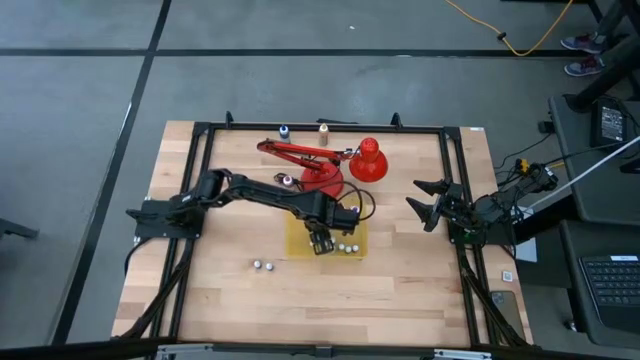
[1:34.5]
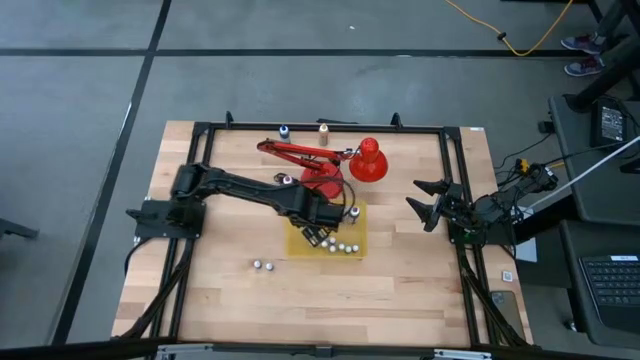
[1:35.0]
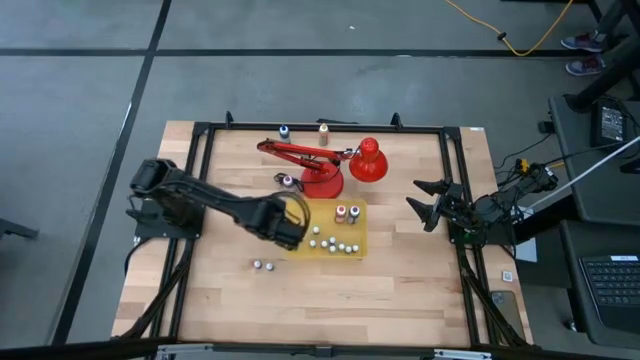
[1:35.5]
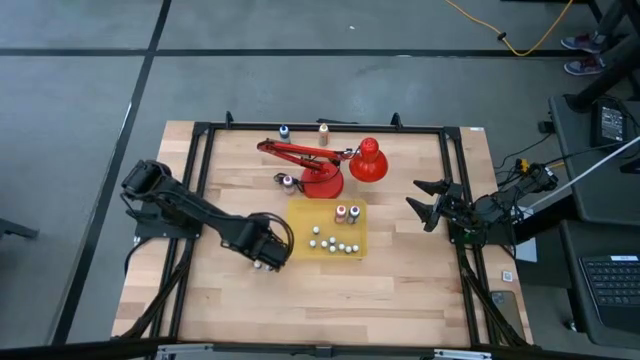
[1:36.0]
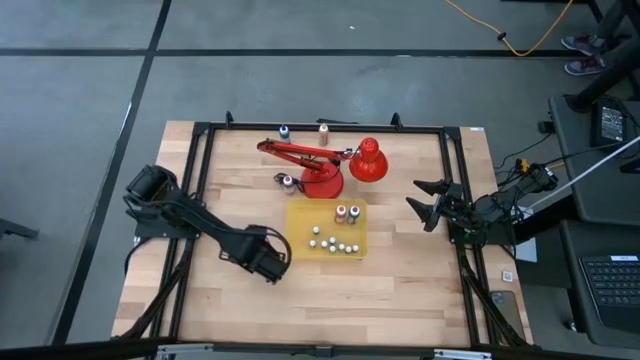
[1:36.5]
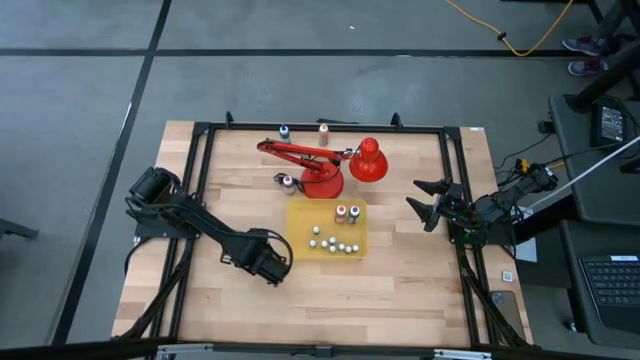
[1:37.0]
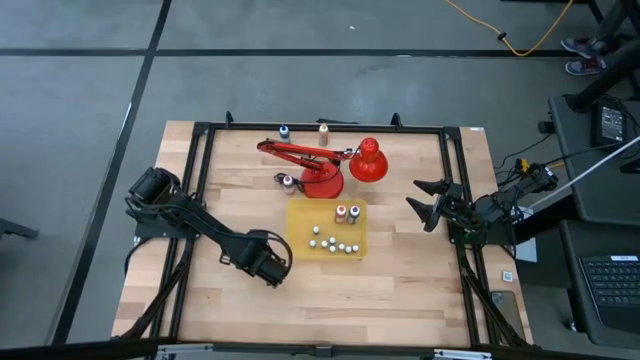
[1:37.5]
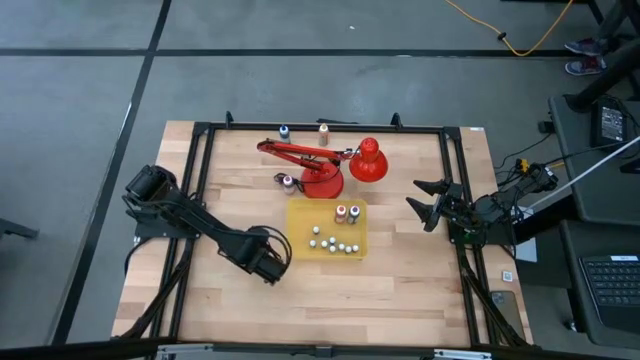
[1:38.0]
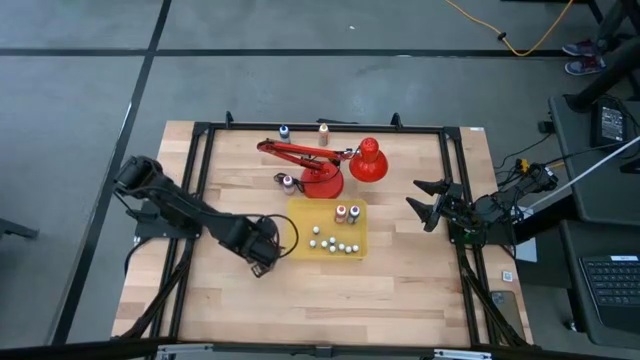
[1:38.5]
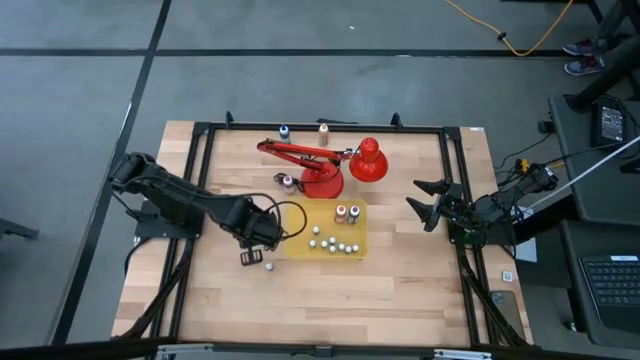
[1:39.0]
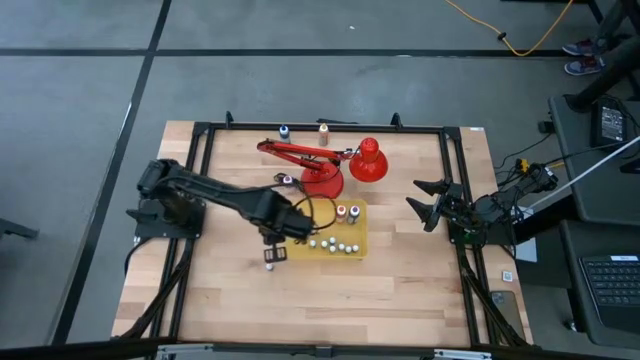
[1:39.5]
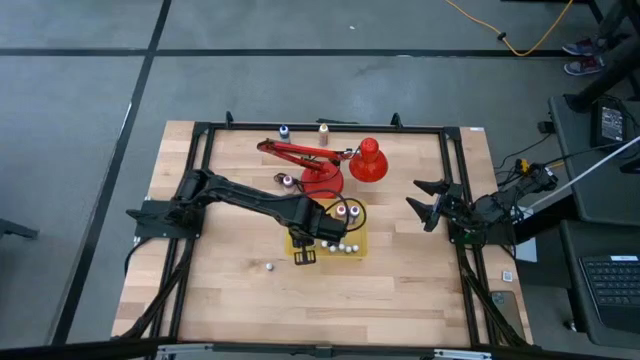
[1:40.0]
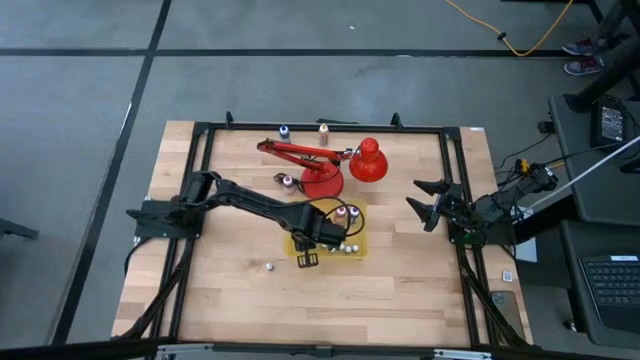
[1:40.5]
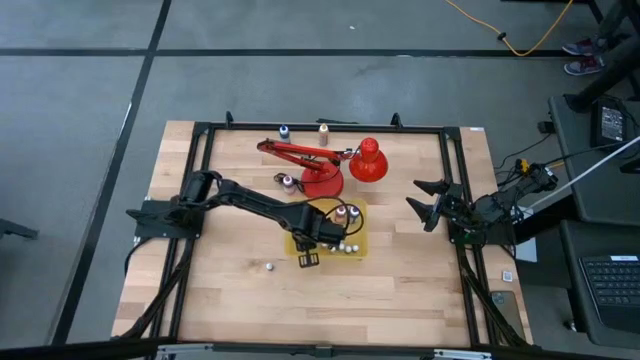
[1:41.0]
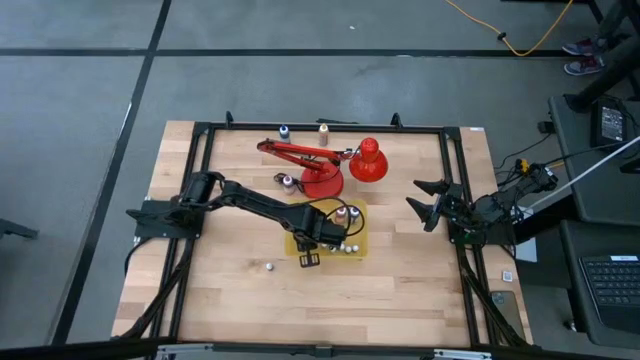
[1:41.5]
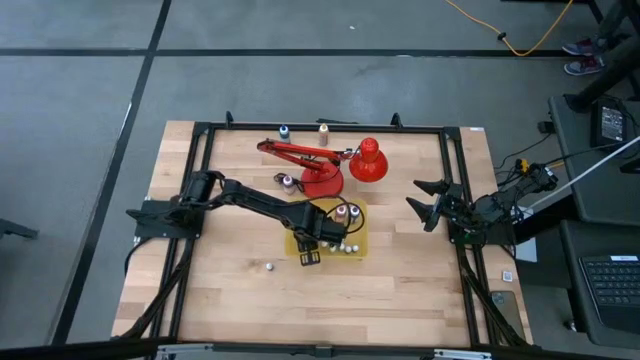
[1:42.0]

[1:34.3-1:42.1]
Task: Pick & Place food coloring
Put the small black food bottle into the yellow bin

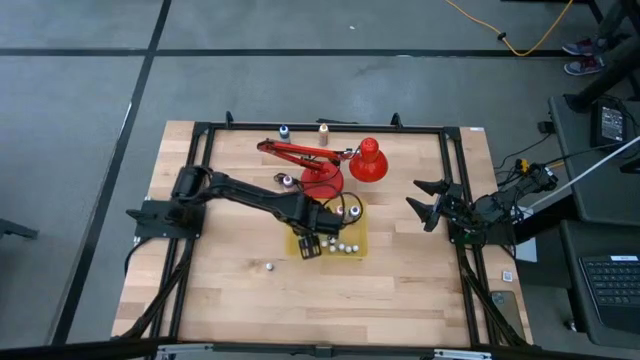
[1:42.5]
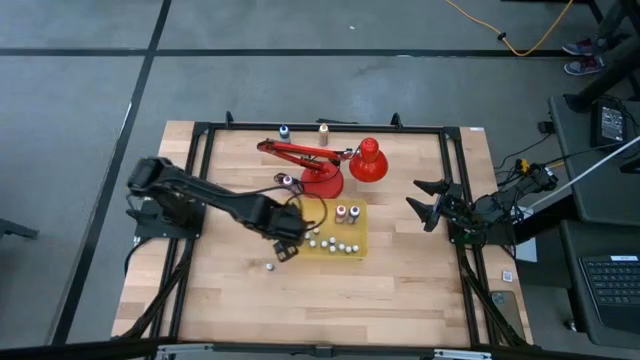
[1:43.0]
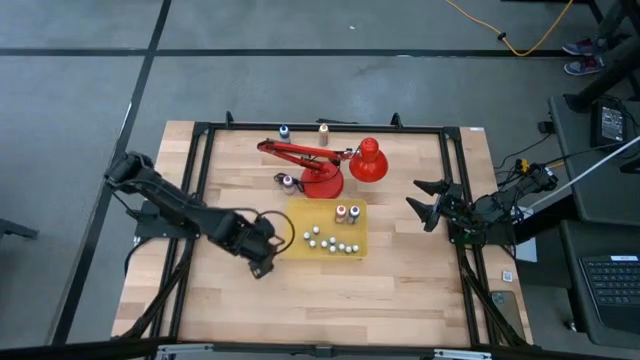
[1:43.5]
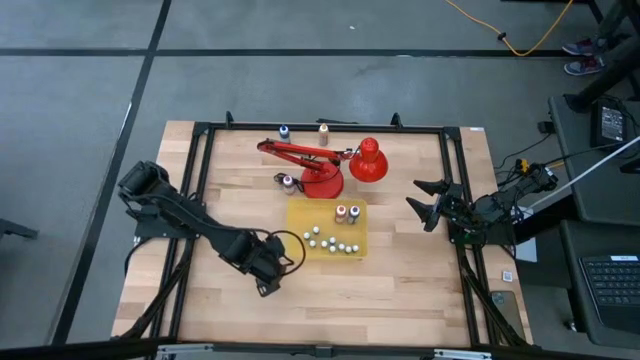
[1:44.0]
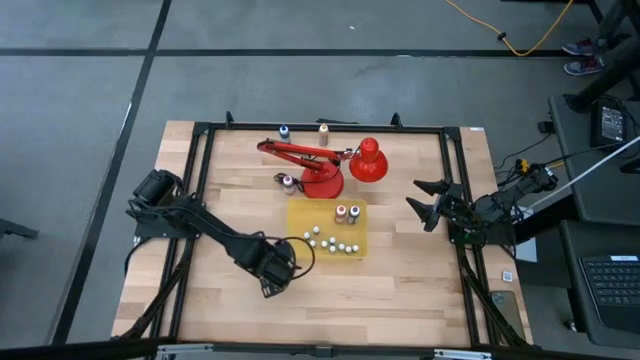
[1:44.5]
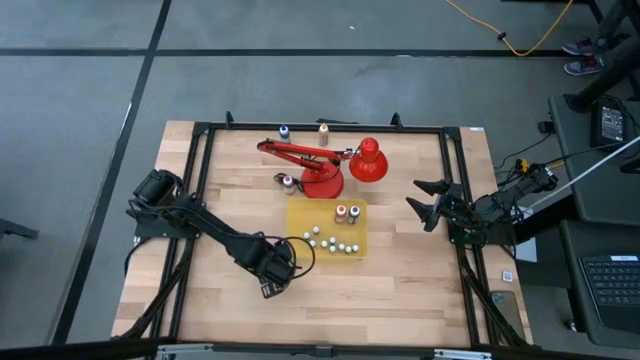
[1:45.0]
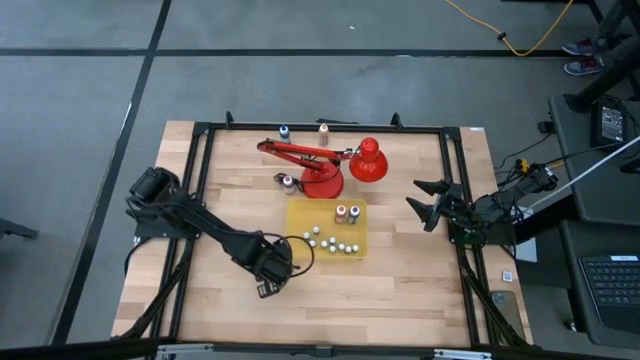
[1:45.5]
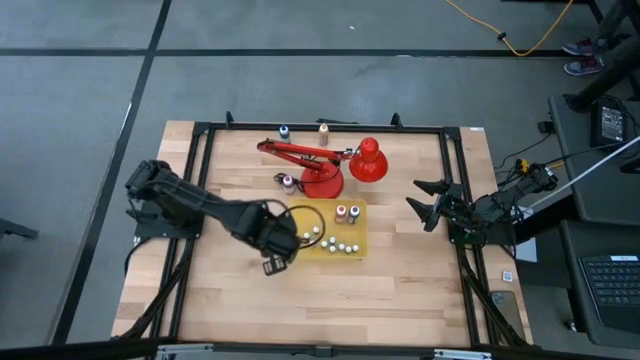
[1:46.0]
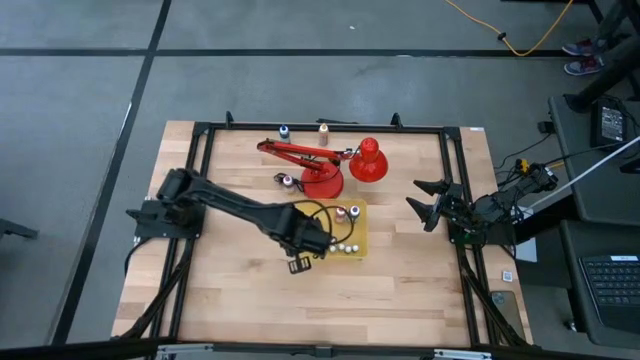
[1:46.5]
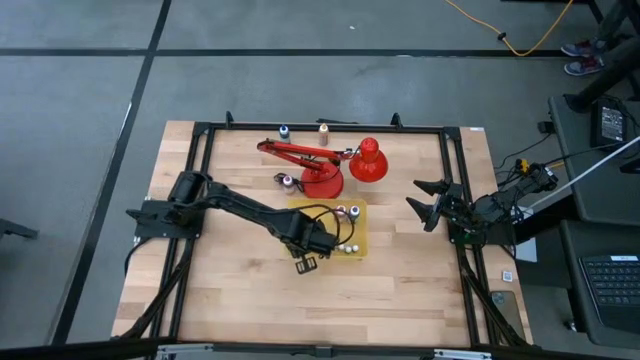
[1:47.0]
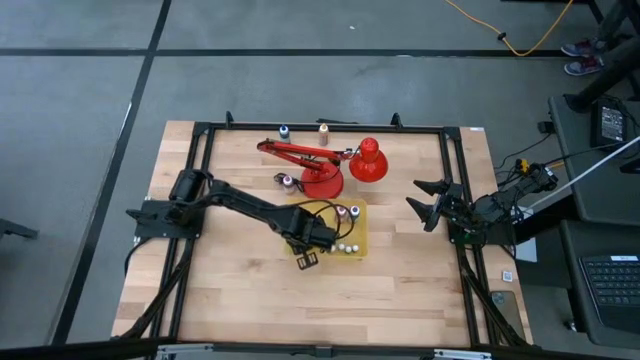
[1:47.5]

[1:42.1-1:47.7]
Put the small red food bottle into the yellow bin

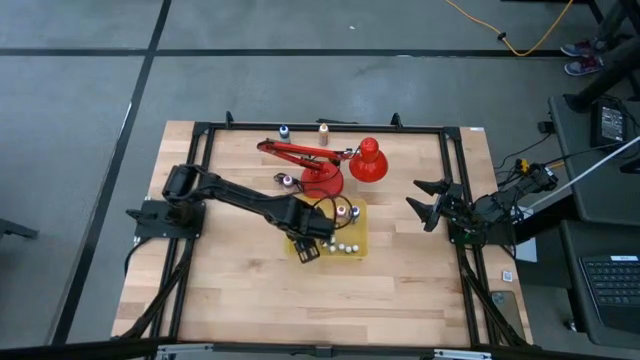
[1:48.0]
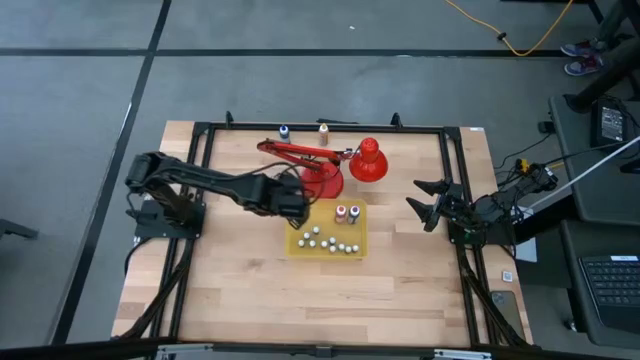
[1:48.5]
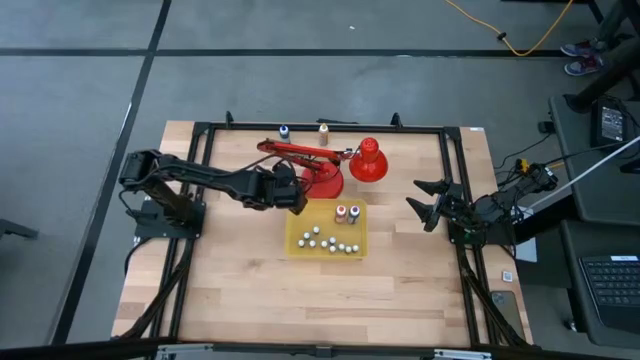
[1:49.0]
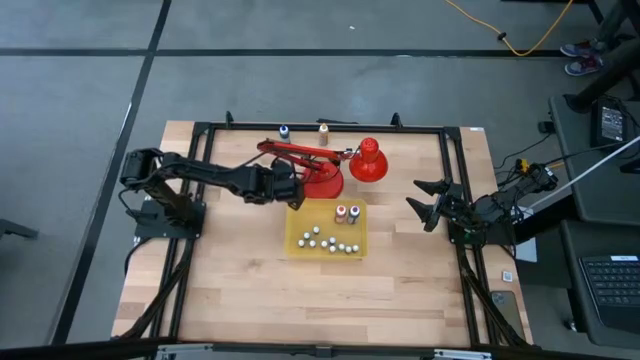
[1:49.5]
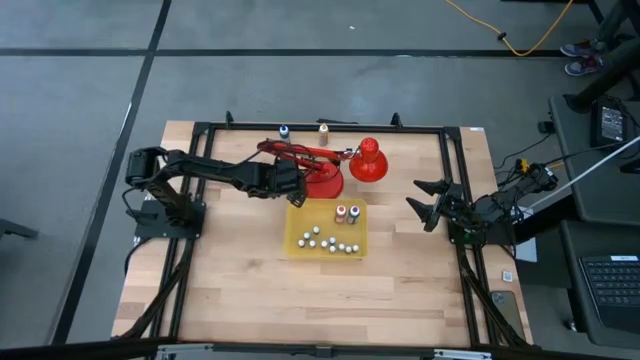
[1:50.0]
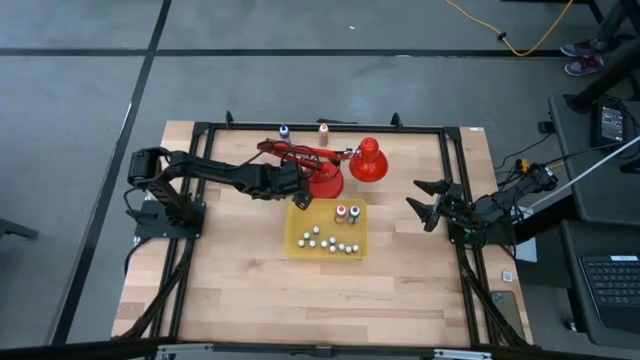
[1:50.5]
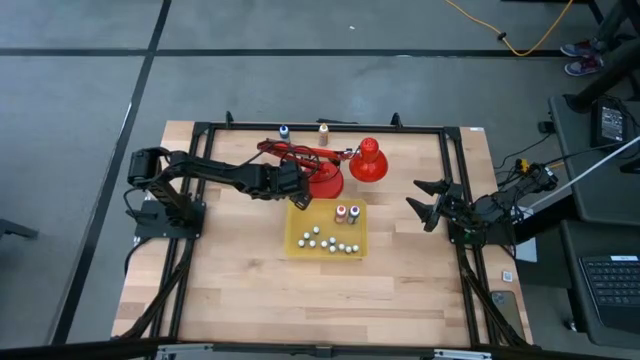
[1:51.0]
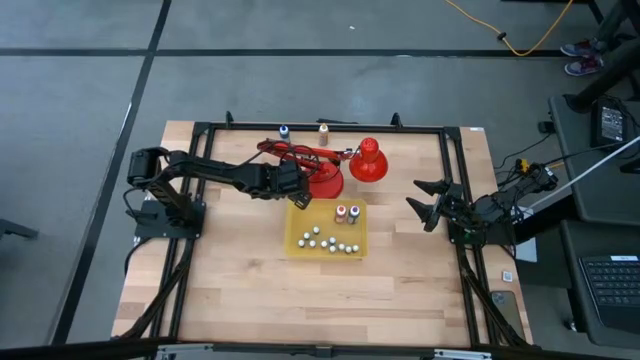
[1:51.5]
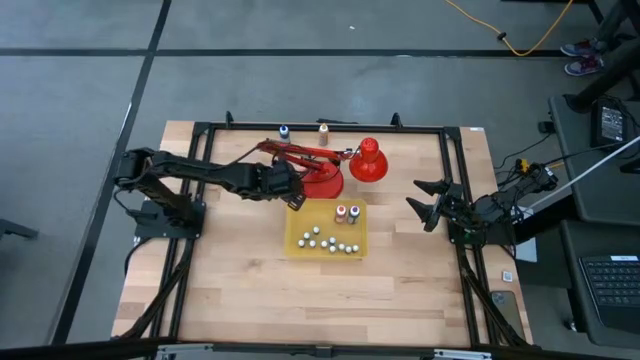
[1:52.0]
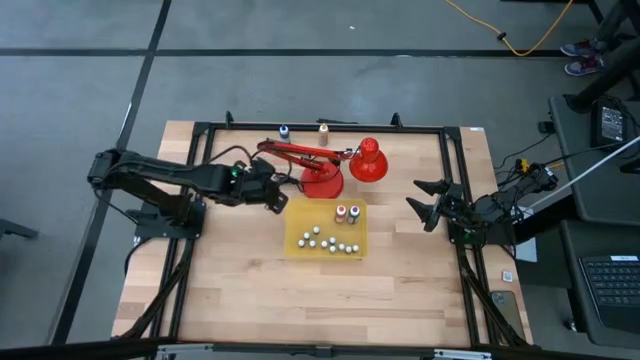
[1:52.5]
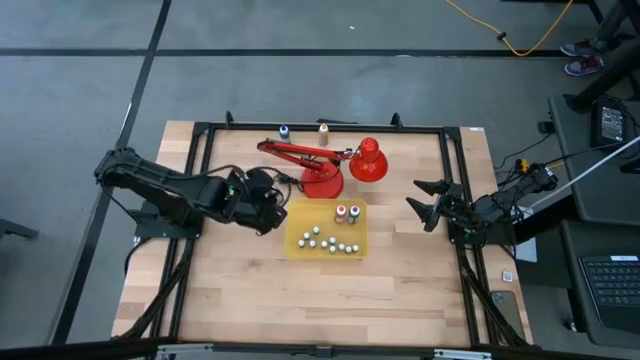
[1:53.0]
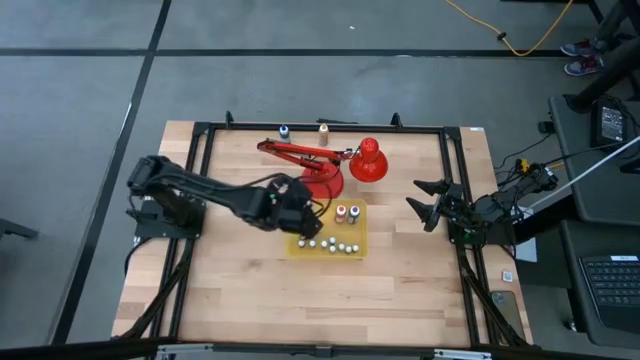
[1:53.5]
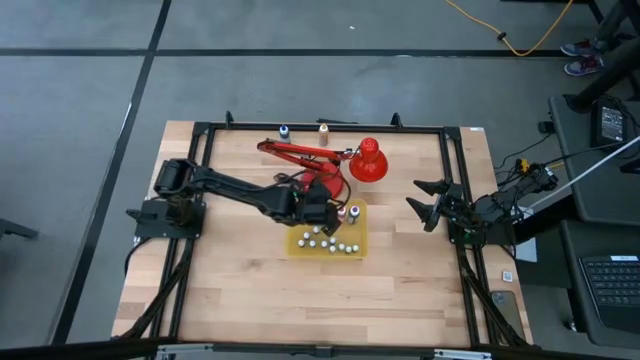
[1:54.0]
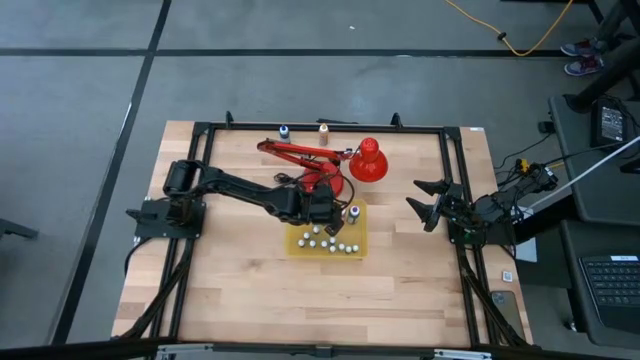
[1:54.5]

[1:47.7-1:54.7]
Put the big red food bottle into the yellow bin

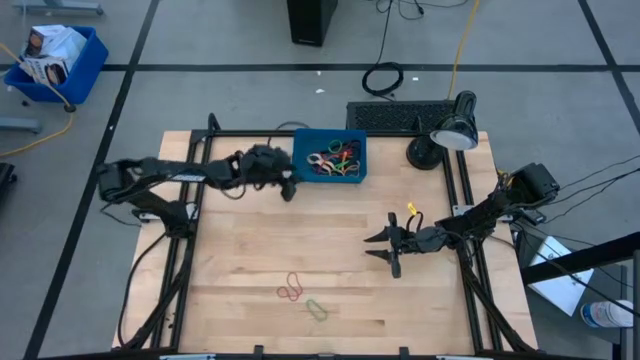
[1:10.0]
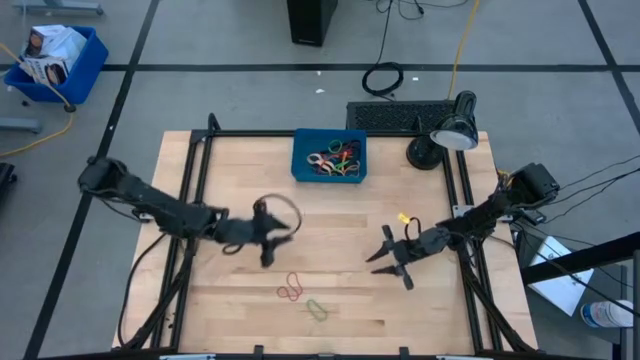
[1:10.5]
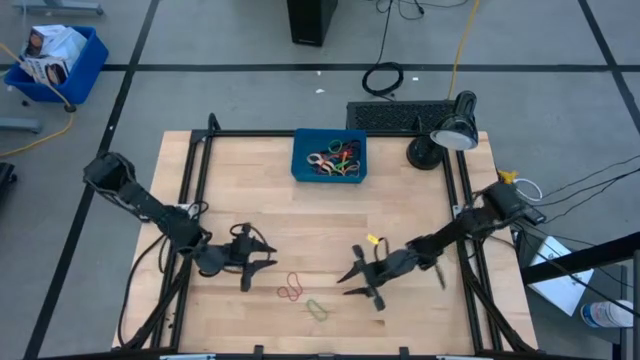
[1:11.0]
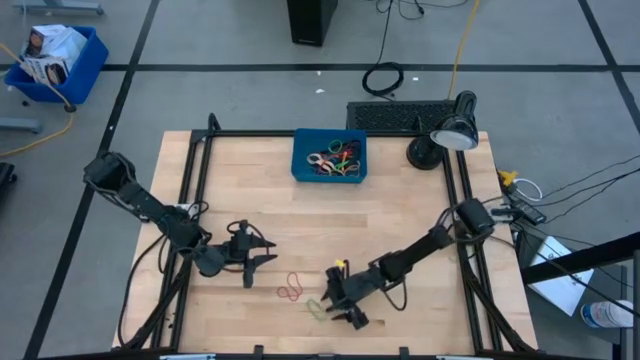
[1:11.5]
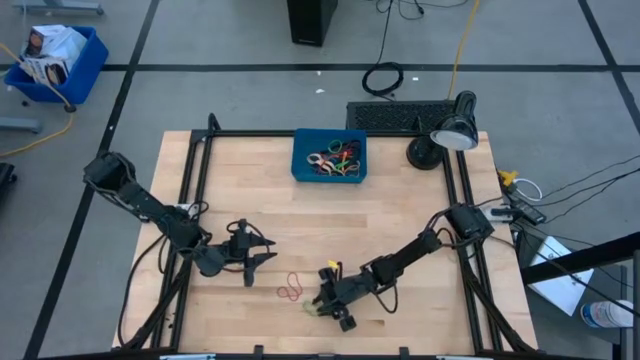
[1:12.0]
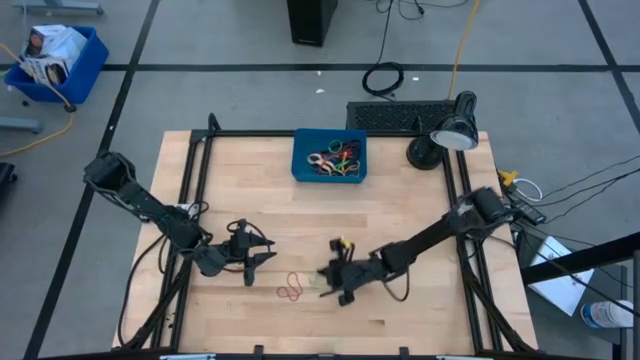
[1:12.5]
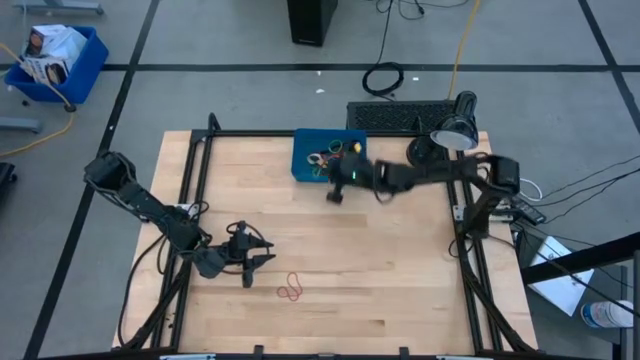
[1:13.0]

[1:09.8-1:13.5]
Task: Pick and place rubber bands into bin
Put the green rubber band into the blue bin
